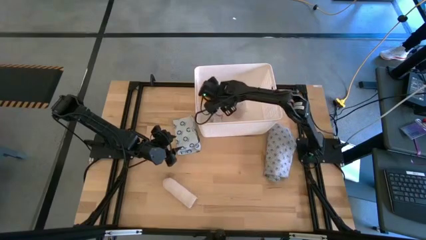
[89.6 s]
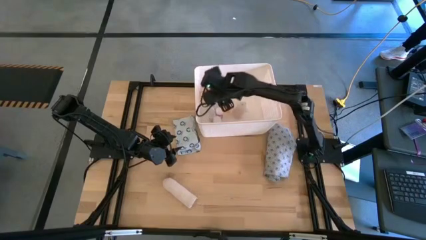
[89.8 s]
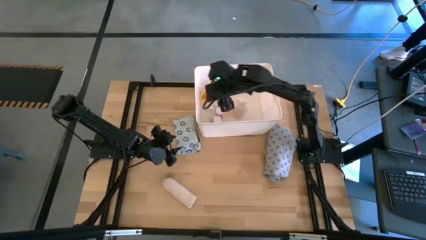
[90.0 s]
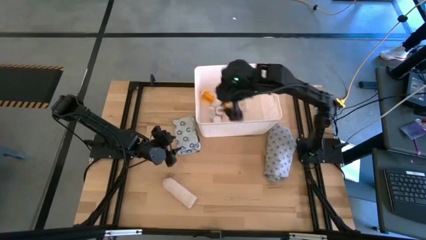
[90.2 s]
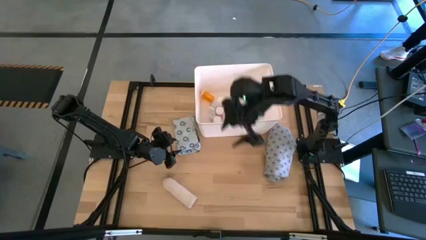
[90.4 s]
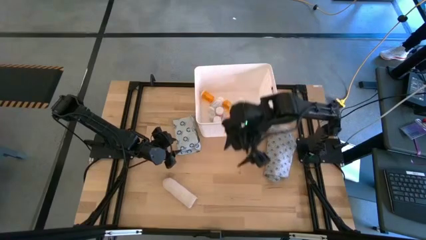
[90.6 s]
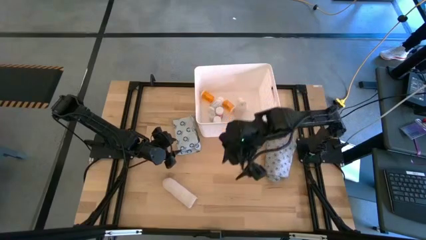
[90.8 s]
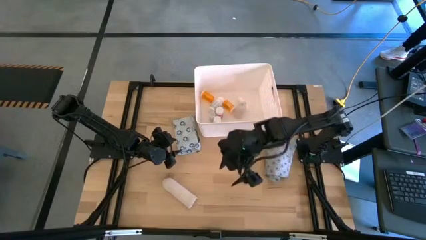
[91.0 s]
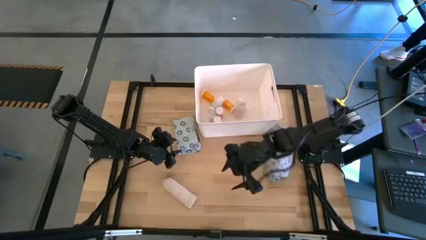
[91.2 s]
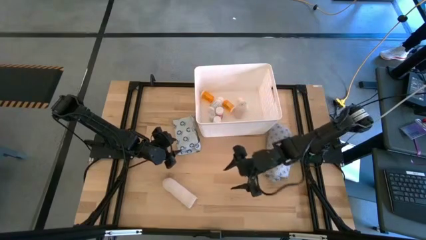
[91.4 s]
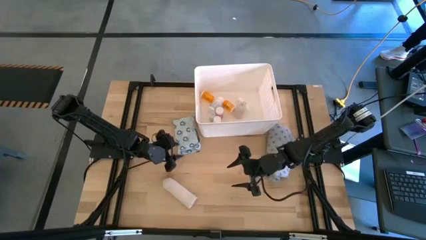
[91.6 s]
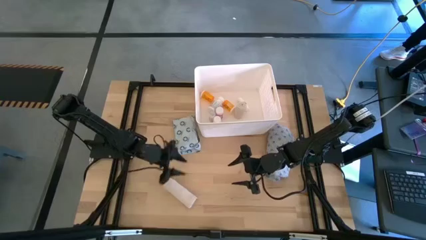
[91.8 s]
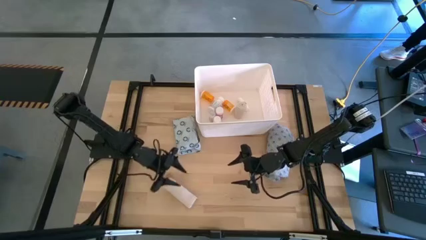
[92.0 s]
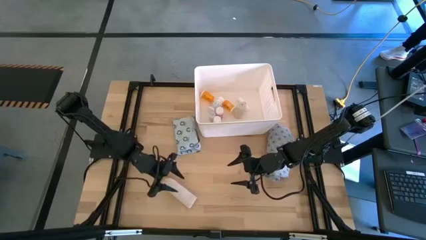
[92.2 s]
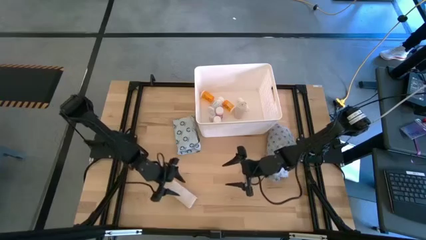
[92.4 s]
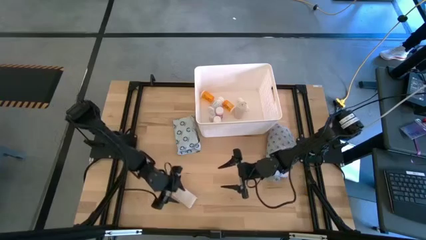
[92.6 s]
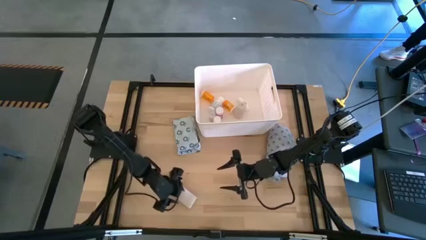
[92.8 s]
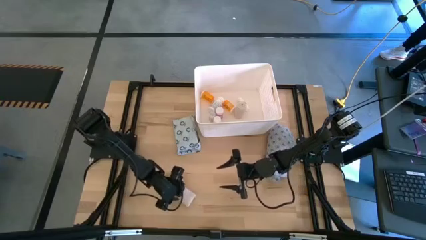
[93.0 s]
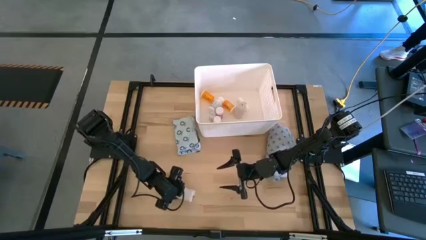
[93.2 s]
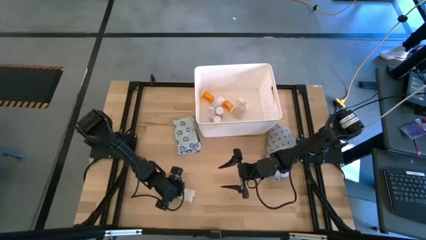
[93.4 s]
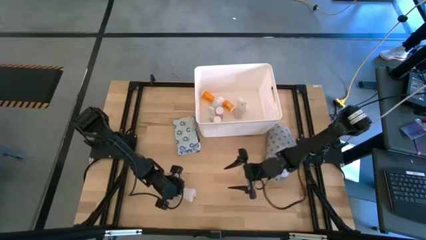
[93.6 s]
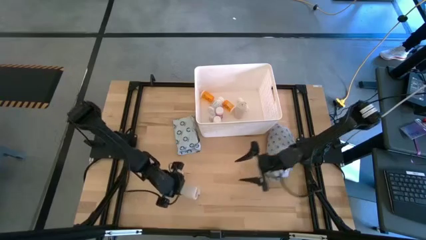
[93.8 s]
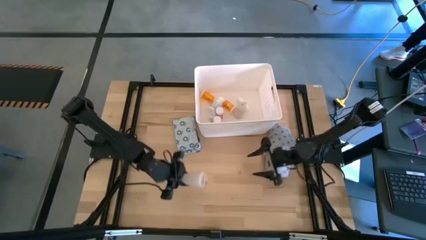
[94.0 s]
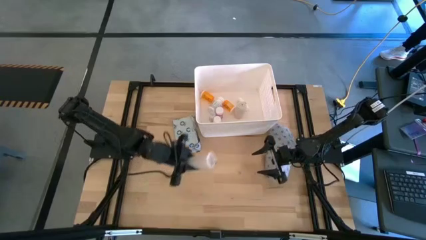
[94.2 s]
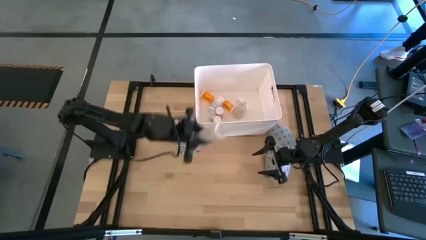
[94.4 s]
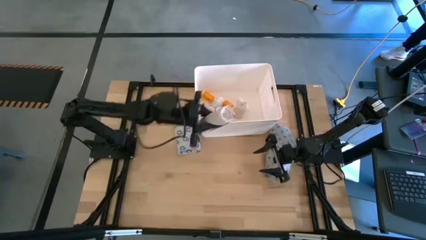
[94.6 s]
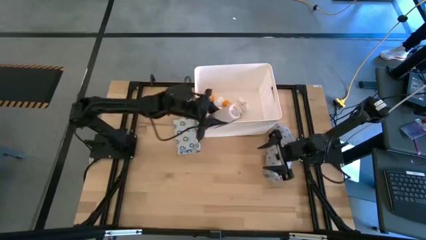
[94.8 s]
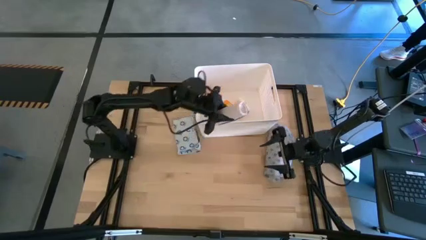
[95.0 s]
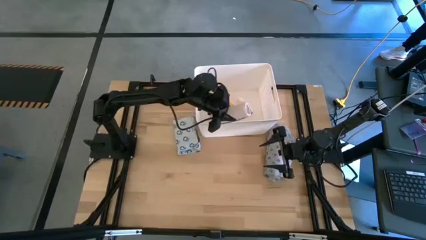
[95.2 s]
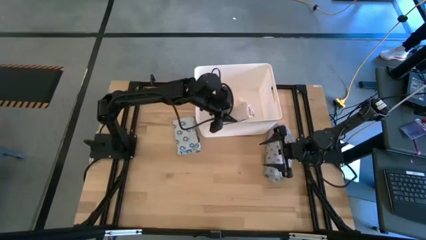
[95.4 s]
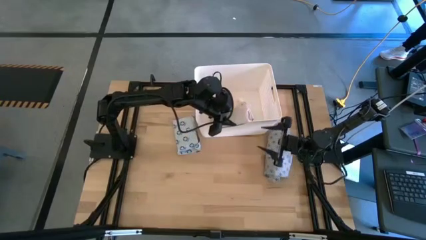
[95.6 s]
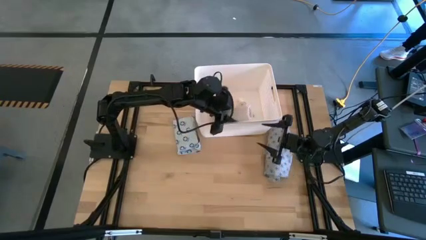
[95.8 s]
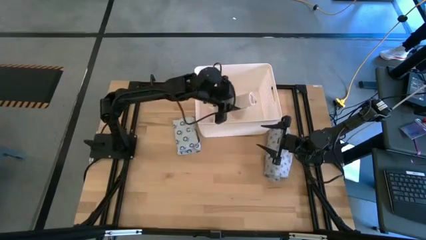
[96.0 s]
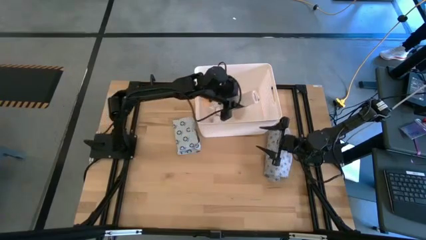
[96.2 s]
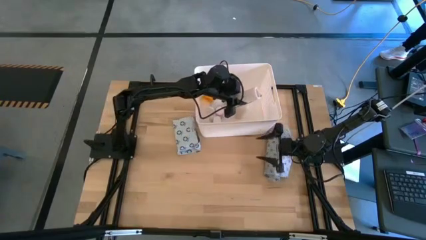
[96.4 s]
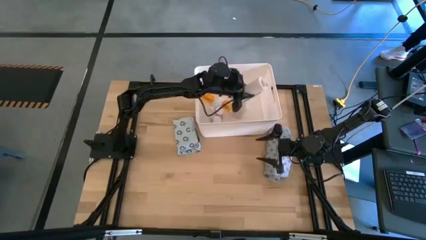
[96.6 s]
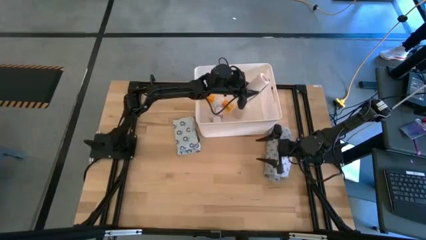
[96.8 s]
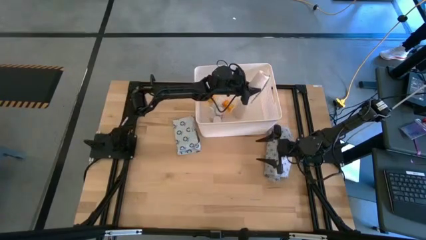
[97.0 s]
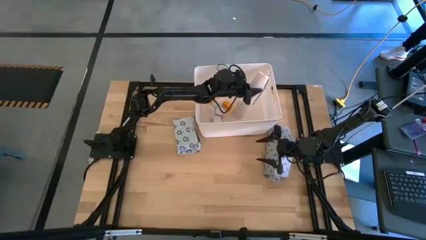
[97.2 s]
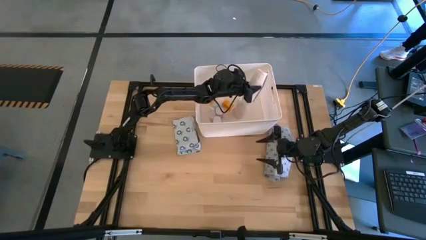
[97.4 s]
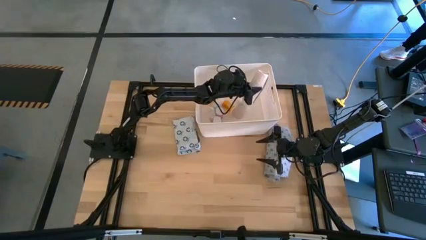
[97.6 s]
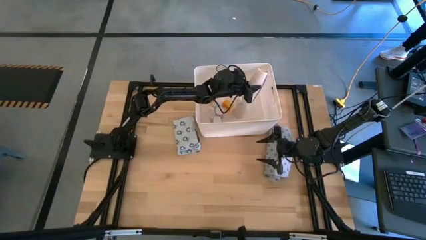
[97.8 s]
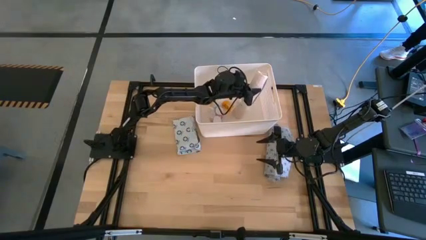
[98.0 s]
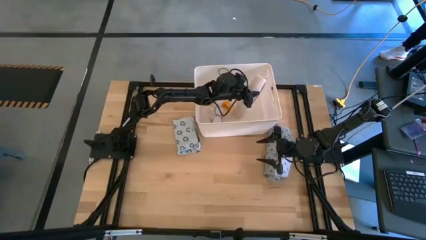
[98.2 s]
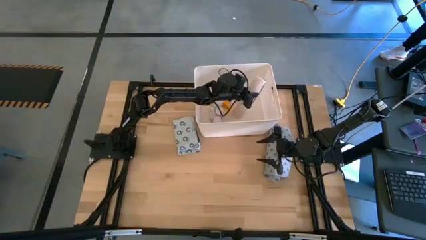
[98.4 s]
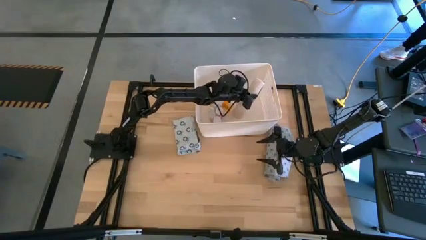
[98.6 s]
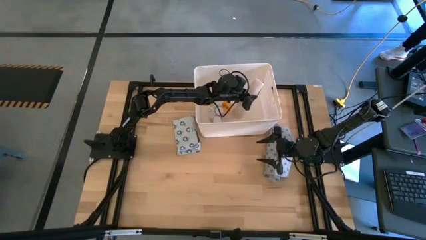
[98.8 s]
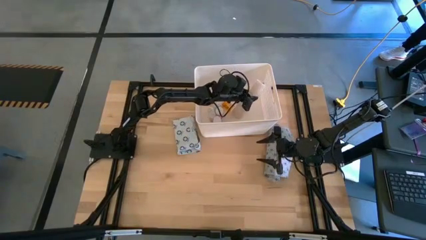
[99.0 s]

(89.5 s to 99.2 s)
Task: Pick & place medical supplies in basket/bin
Put the brown bandage into the white bin

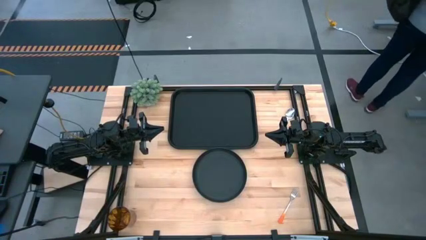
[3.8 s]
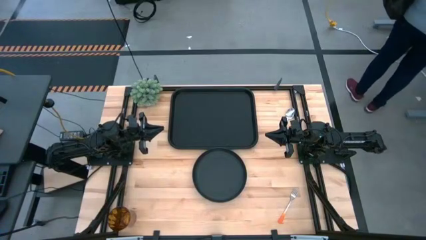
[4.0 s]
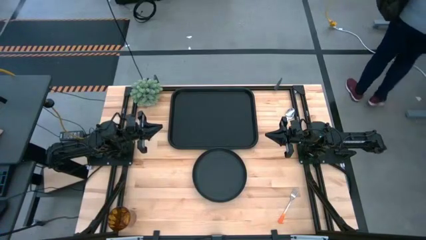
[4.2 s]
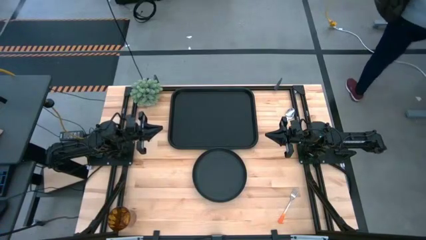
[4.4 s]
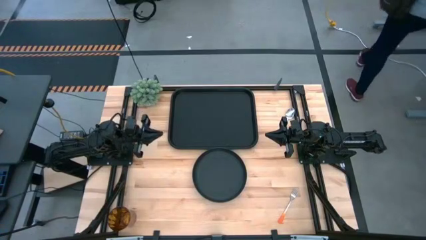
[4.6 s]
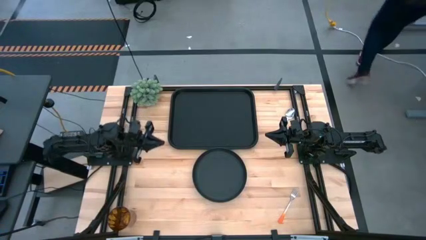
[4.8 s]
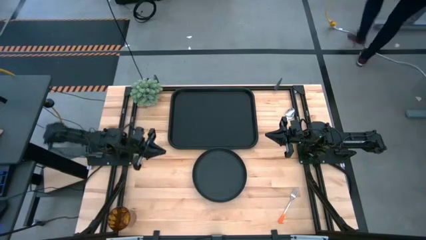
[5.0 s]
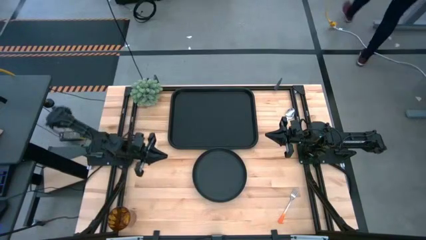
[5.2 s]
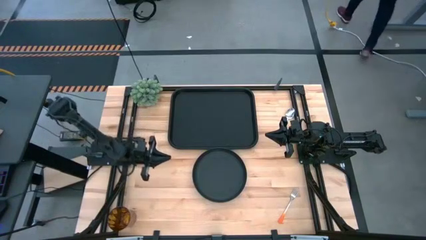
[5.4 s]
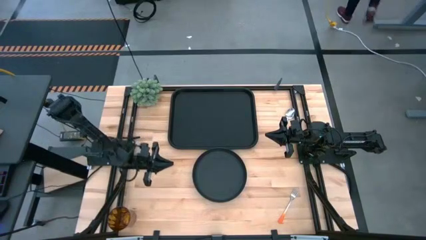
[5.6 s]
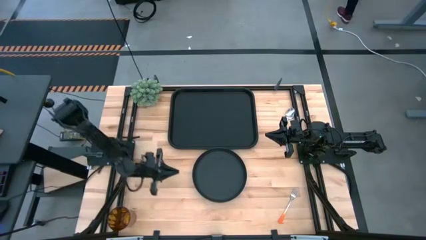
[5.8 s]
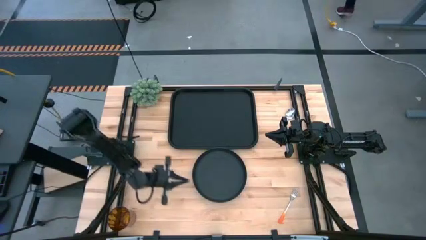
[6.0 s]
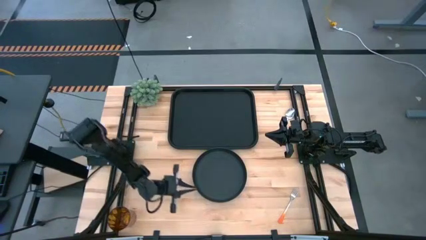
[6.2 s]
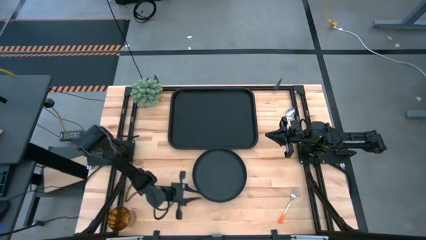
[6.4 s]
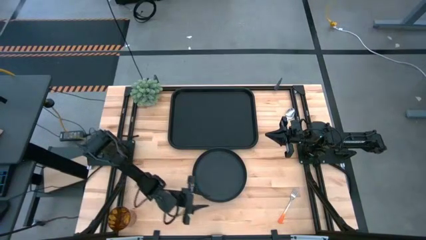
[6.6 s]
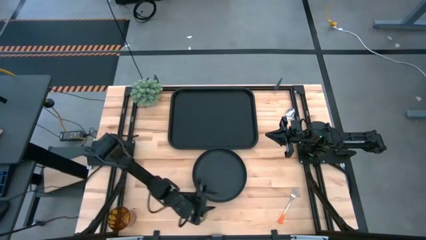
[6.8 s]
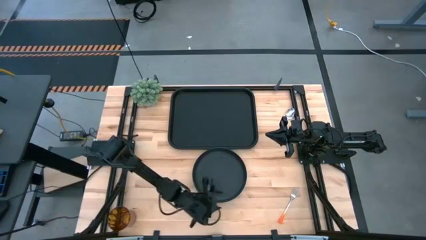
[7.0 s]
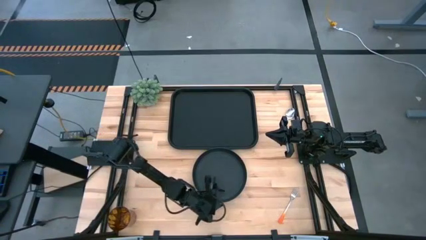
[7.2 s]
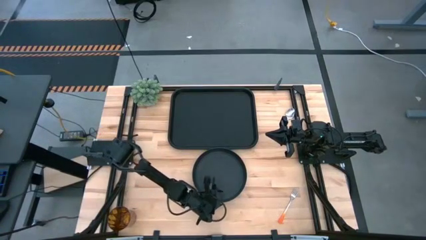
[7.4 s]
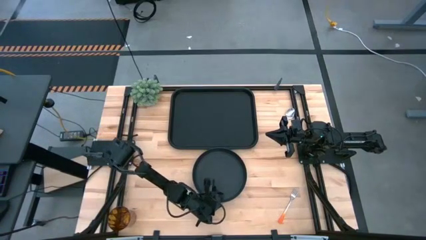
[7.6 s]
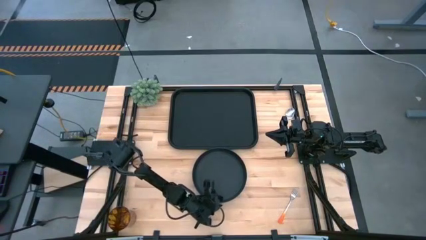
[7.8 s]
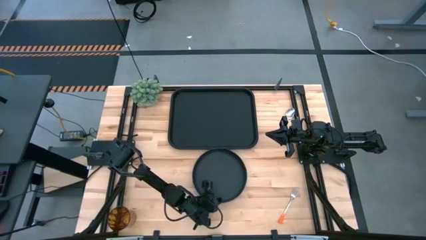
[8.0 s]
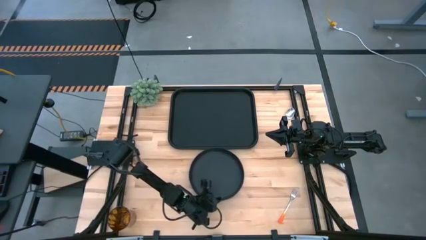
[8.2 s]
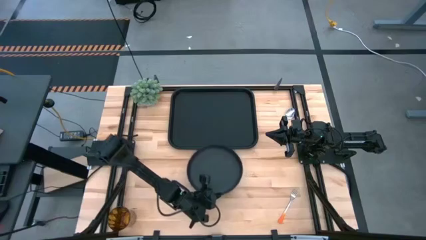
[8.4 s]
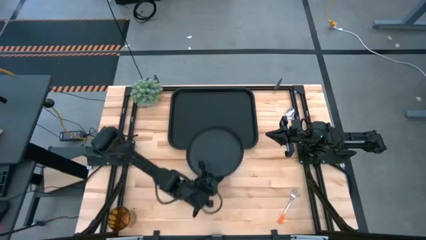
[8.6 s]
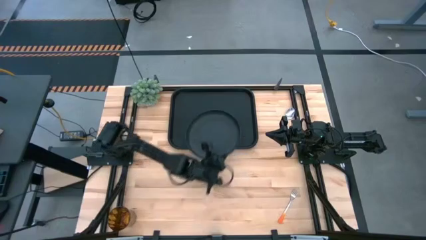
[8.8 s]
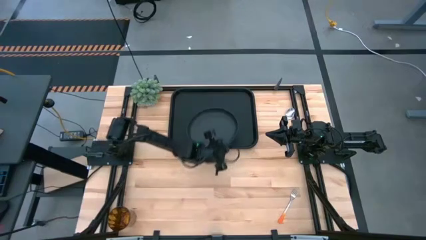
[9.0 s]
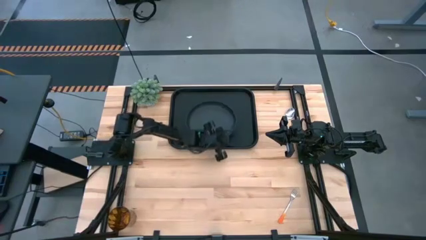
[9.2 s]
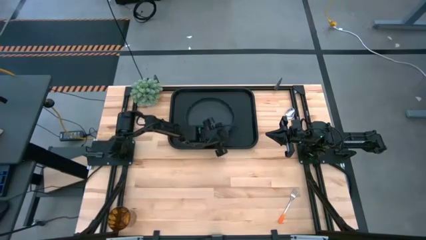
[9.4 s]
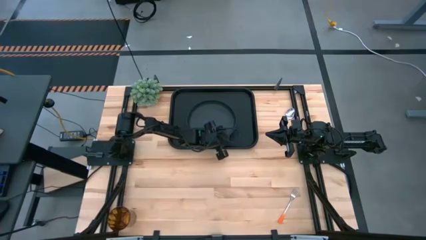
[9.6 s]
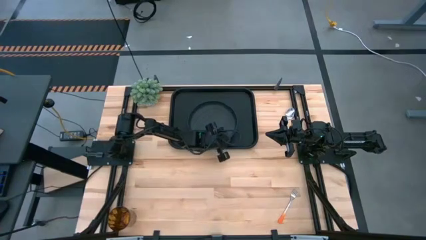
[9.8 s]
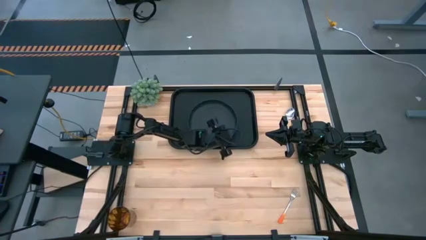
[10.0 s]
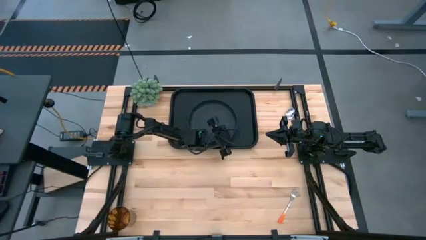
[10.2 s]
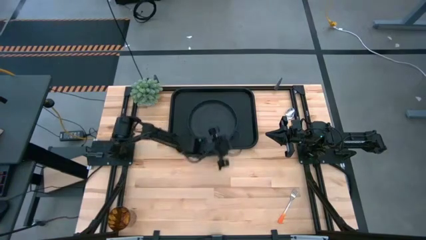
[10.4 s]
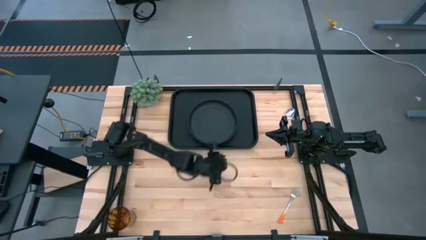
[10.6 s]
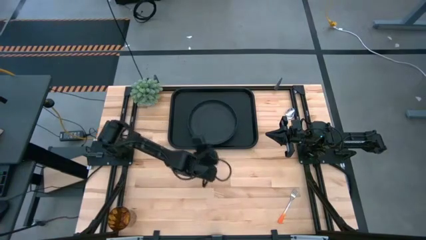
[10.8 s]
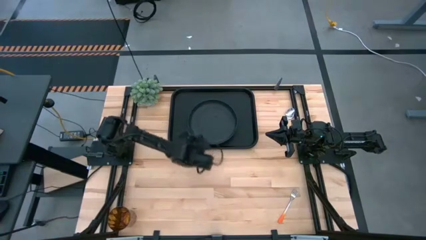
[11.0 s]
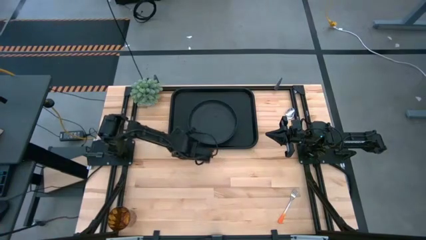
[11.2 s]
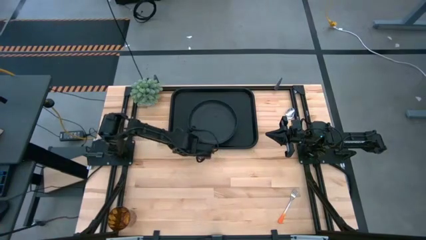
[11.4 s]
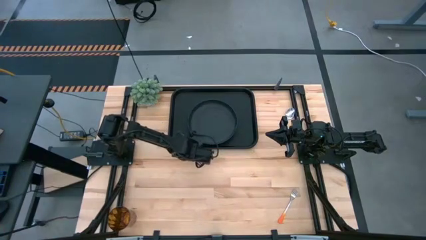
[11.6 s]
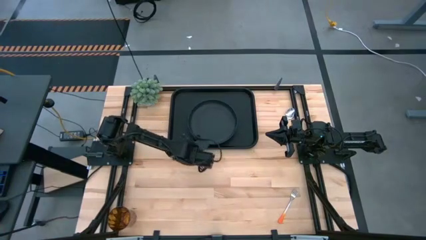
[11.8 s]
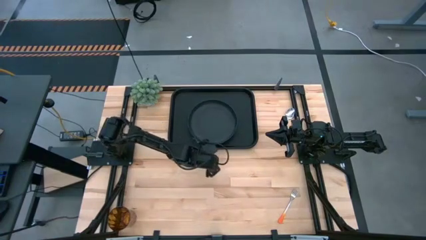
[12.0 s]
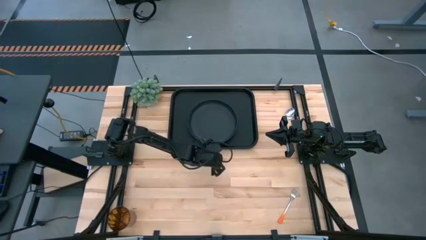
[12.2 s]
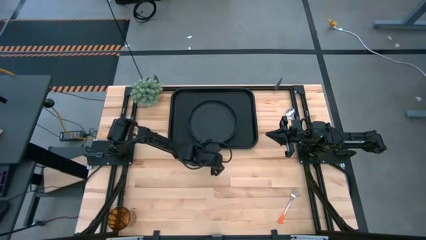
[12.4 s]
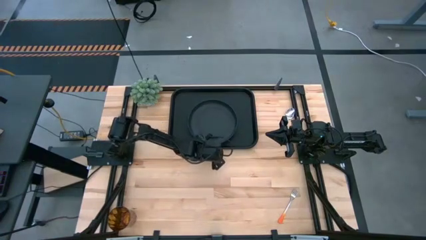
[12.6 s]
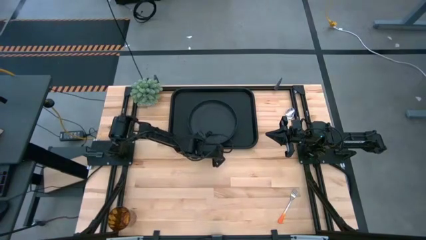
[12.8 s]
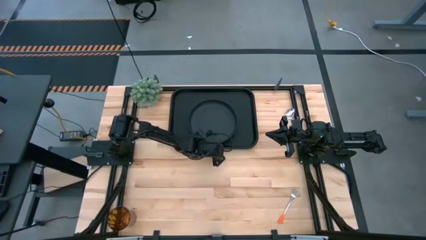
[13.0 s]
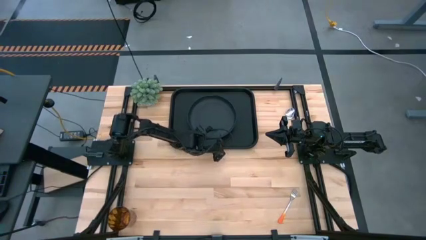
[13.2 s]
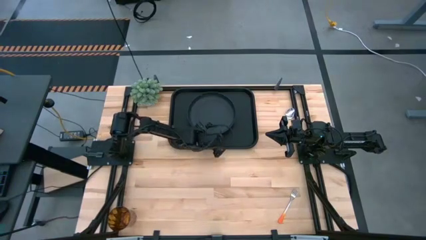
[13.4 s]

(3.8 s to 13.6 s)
Task: Pick and place plate/cup/fork/spoon on tray
Put the black plate on black serving tray
